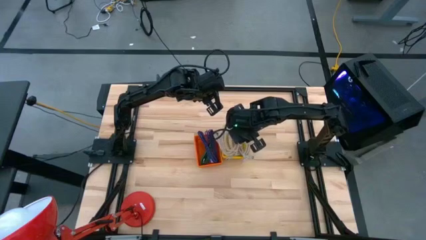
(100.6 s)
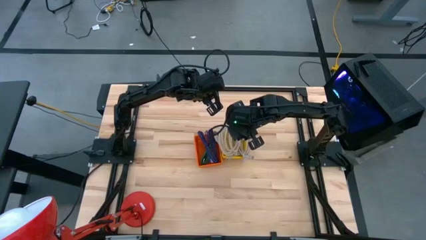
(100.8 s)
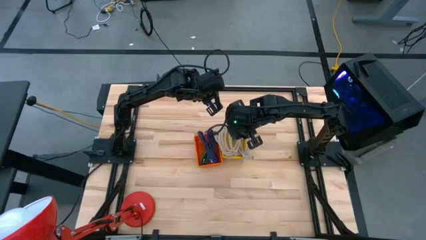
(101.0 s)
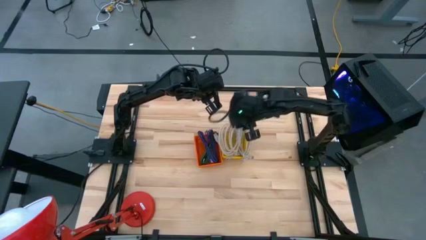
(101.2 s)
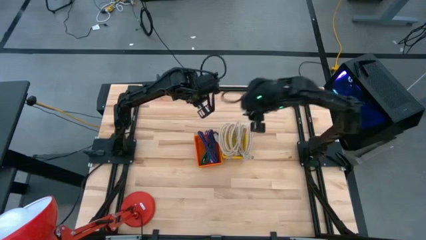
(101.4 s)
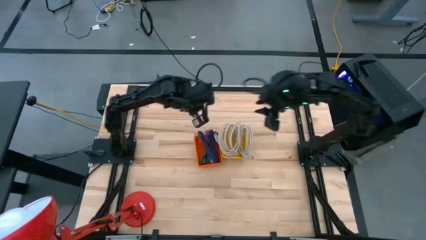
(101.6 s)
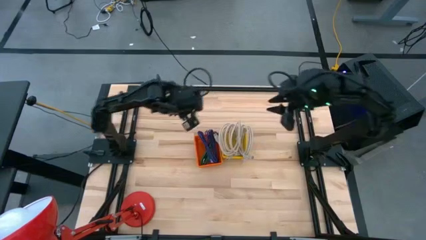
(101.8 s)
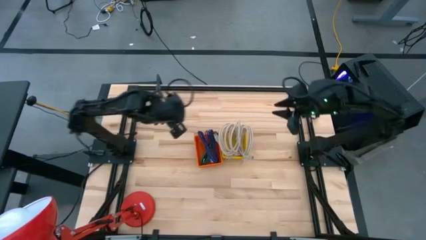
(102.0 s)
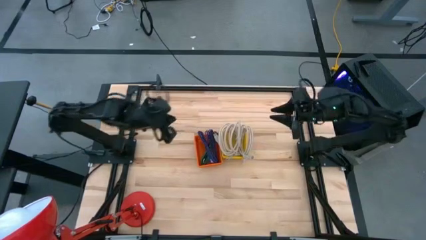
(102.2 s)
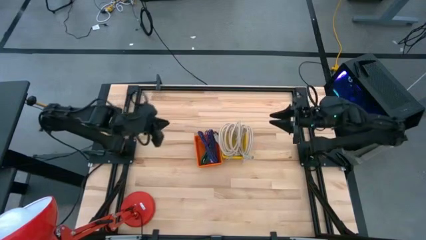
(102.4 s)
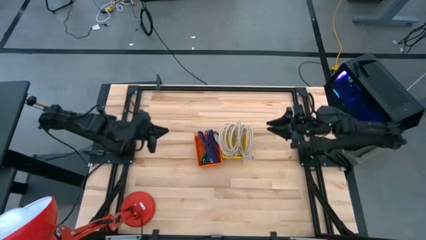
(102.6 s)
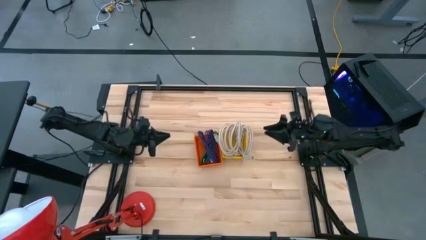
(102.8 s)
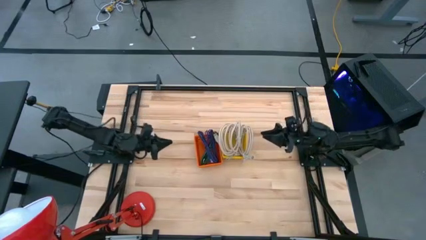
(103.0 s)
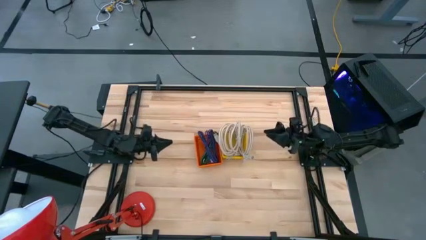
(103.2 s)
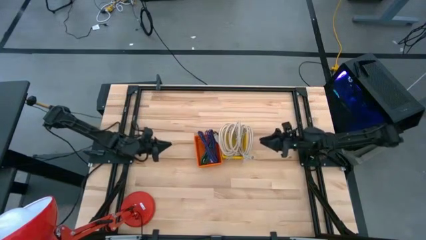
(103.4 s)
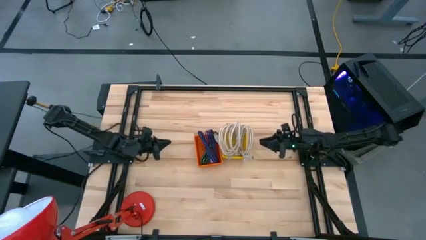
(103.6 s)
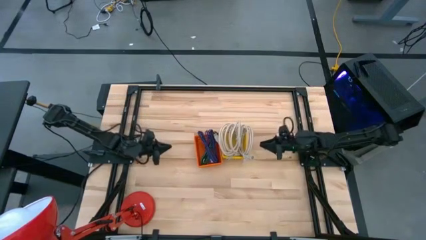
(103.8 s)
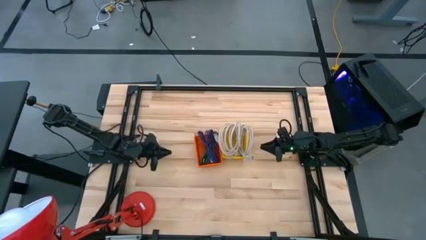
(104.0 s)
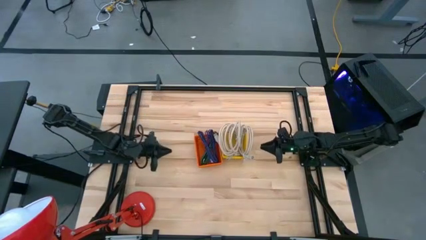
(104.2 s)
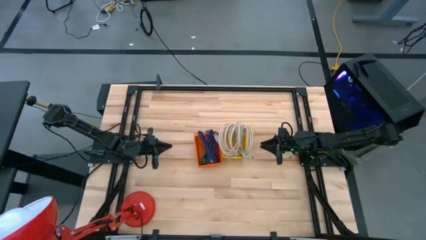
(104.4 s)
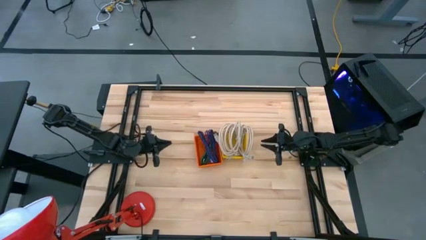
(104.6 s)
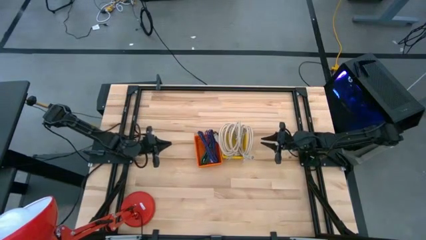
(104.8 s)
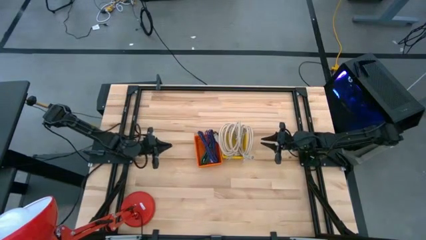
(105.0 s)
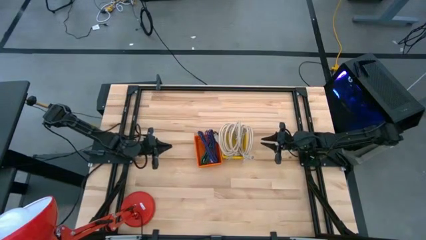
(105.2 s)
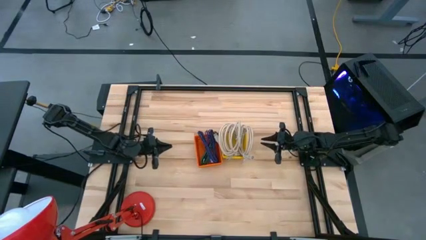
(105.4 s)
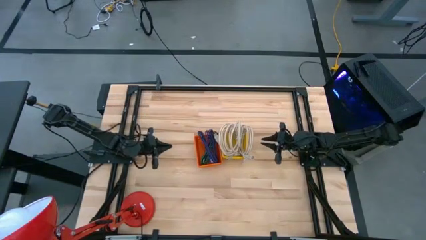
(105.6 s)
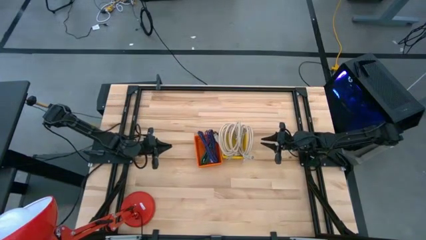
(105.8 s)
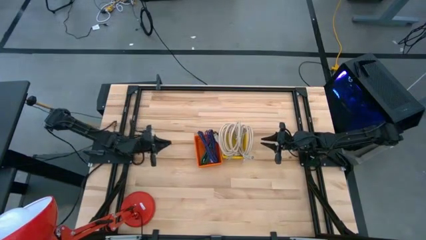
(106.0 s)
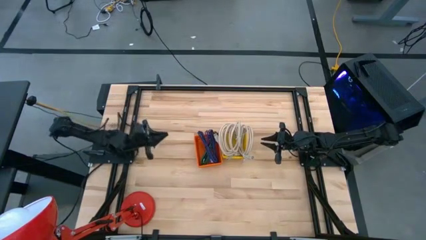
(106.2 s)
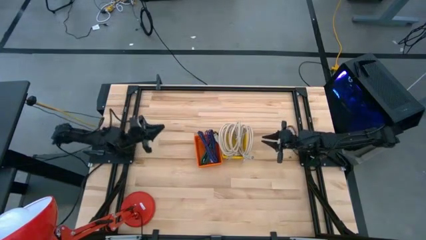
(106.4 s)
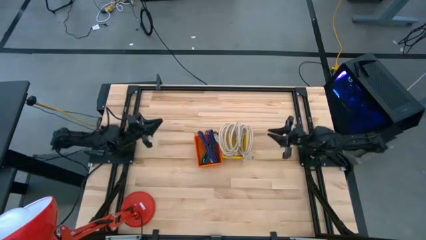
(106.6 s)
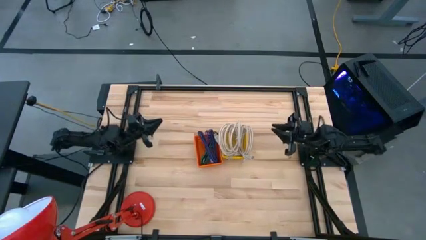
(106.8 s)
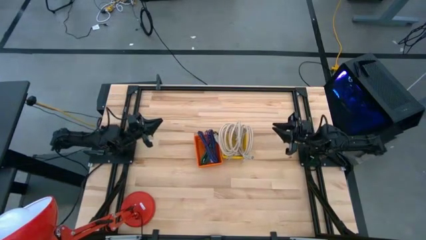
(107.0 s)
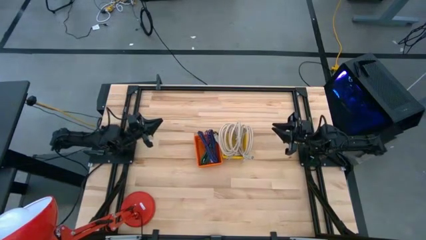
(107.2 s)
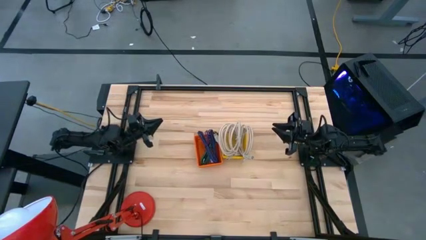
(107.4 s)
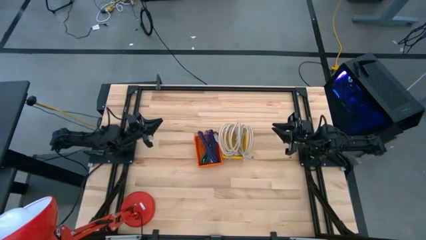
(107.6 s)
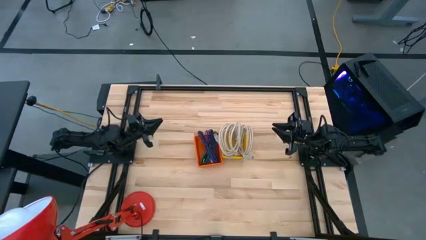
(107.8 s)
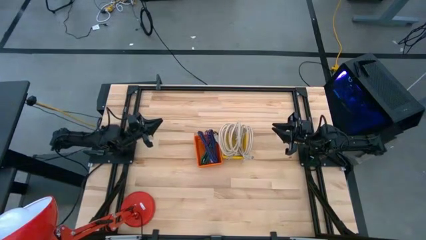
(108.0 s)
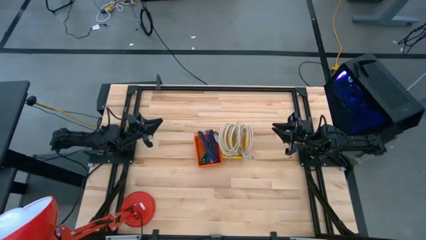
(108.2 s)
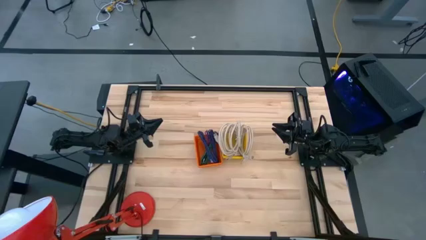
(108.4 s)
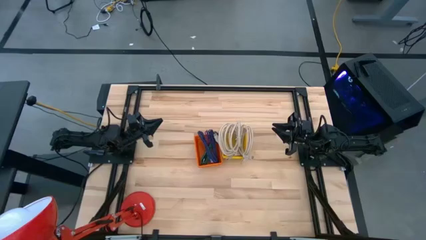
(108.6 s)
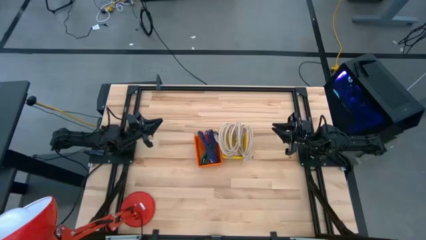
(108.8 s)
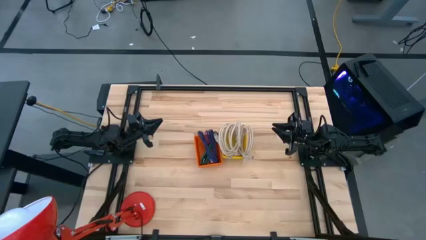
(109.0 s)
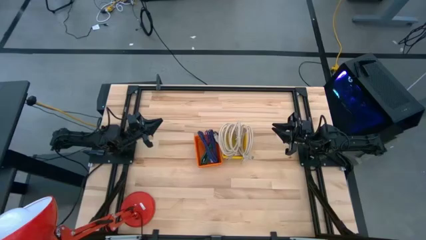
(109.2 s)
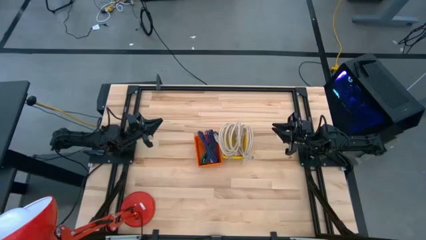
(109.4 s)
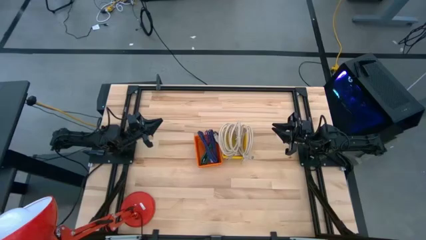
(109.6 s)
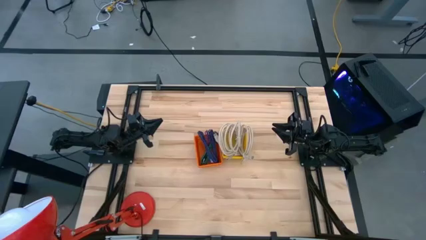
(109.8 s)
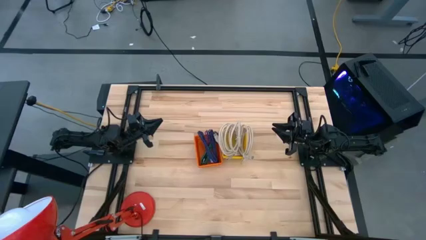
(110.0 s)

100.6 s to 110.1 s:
Task: Pick & Place USB Port
Return to Home Position

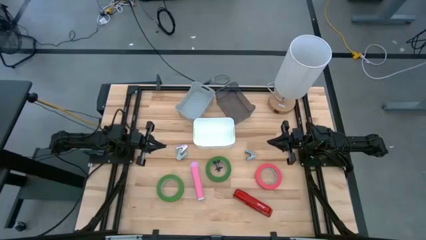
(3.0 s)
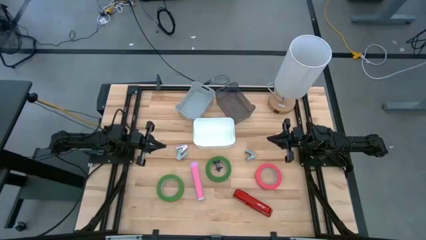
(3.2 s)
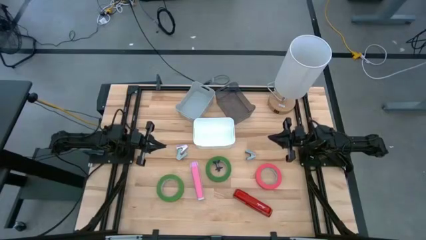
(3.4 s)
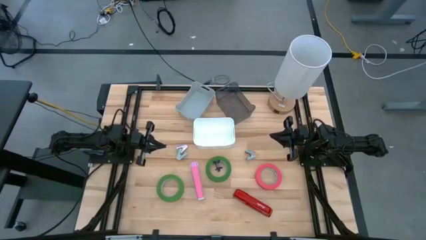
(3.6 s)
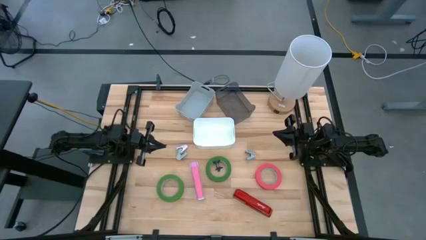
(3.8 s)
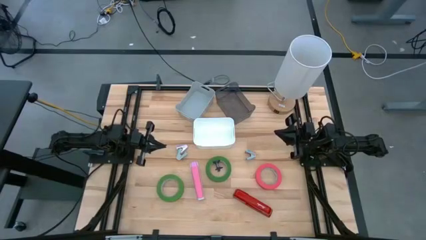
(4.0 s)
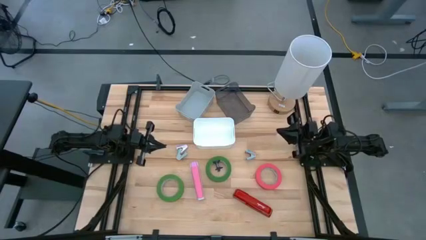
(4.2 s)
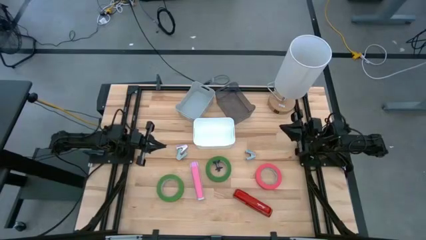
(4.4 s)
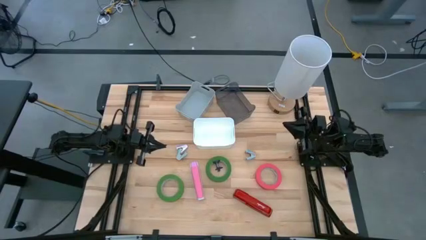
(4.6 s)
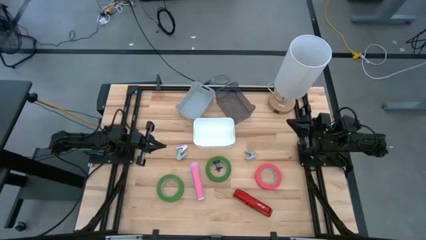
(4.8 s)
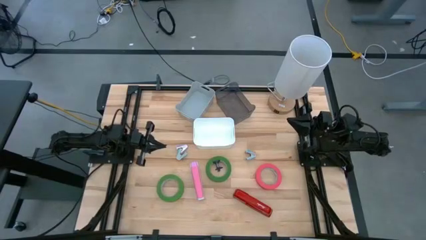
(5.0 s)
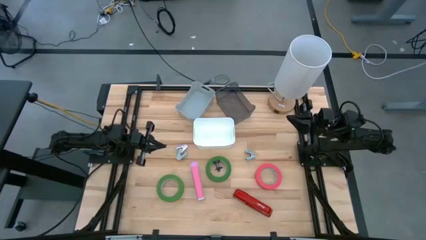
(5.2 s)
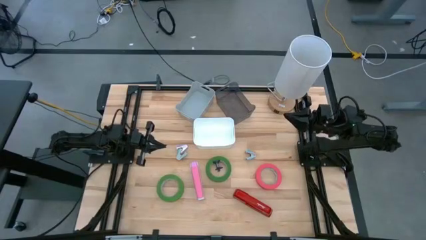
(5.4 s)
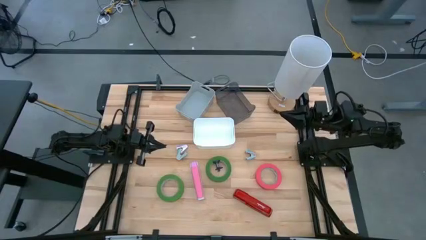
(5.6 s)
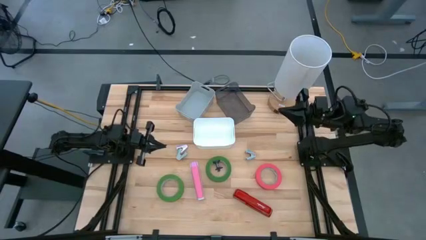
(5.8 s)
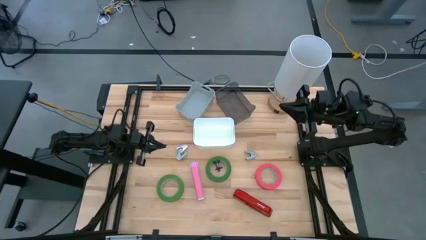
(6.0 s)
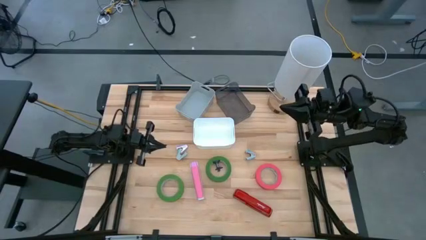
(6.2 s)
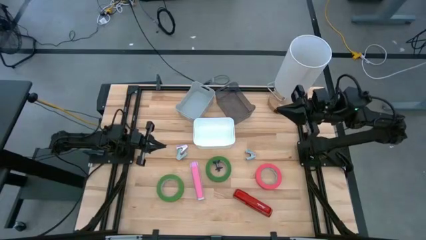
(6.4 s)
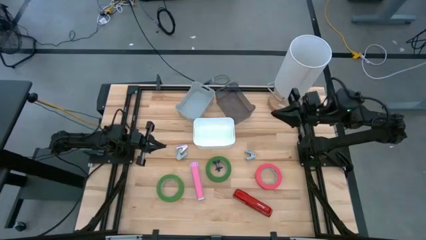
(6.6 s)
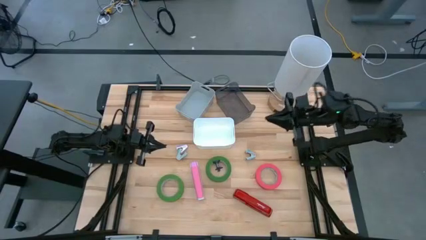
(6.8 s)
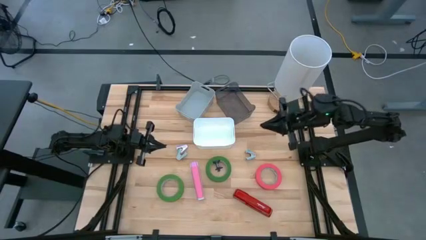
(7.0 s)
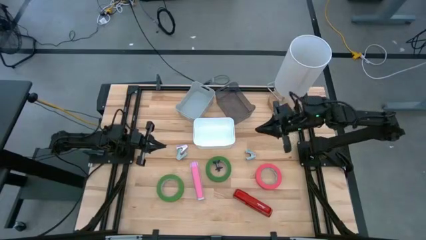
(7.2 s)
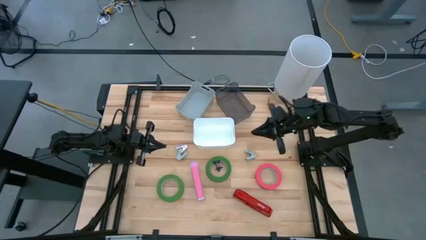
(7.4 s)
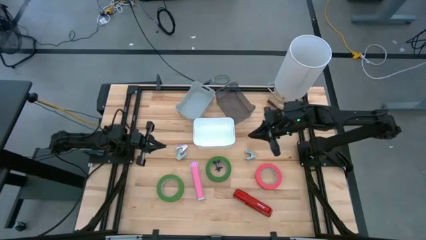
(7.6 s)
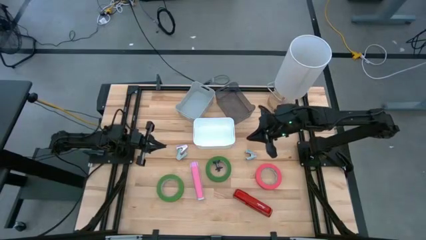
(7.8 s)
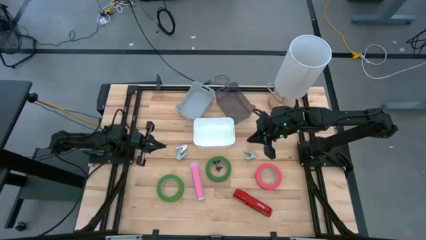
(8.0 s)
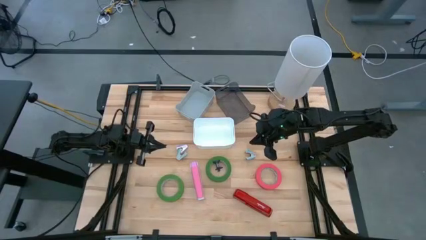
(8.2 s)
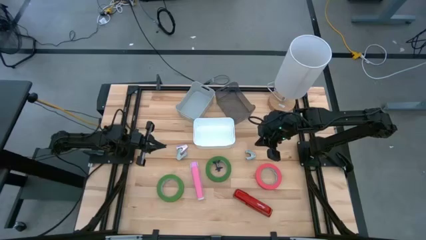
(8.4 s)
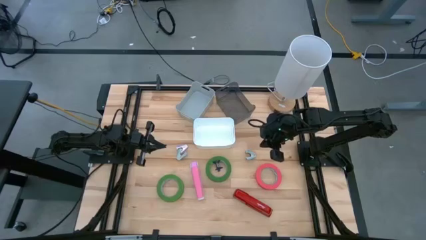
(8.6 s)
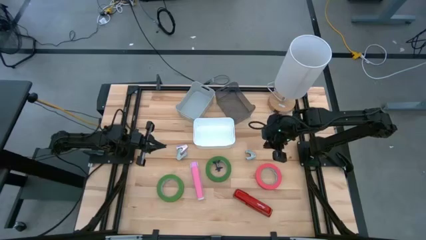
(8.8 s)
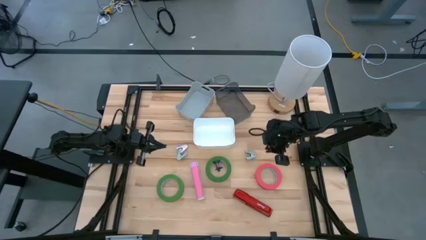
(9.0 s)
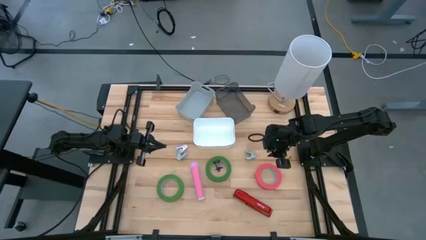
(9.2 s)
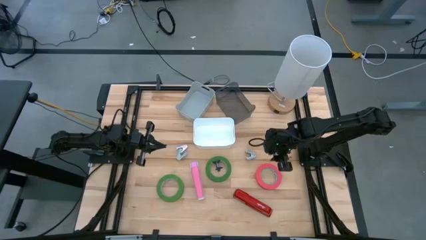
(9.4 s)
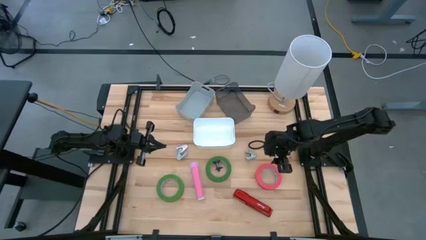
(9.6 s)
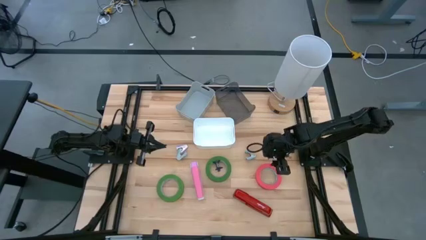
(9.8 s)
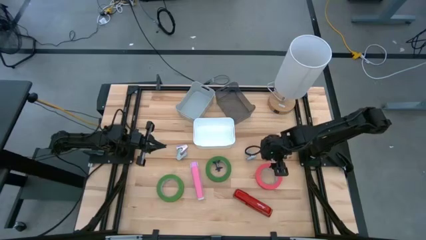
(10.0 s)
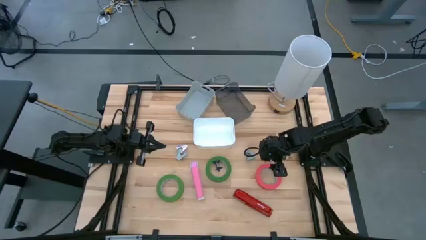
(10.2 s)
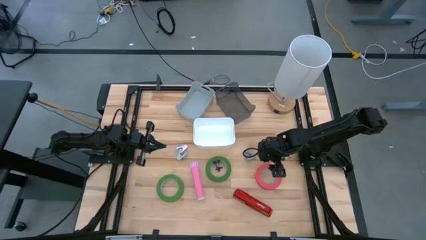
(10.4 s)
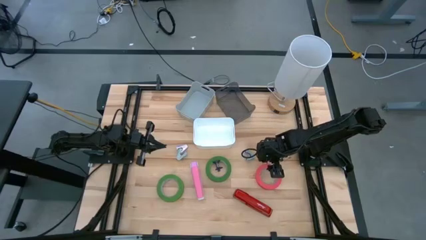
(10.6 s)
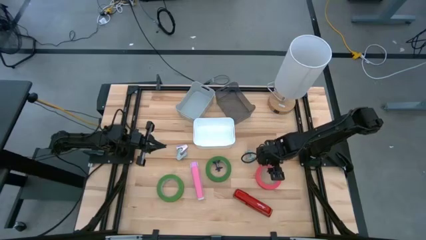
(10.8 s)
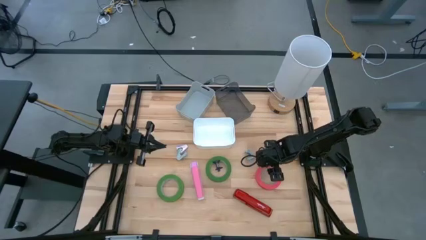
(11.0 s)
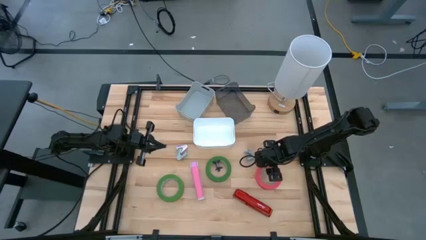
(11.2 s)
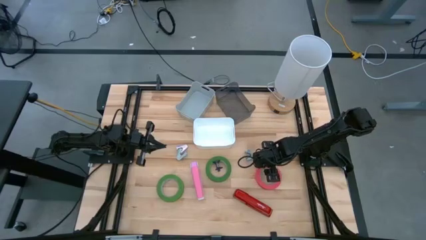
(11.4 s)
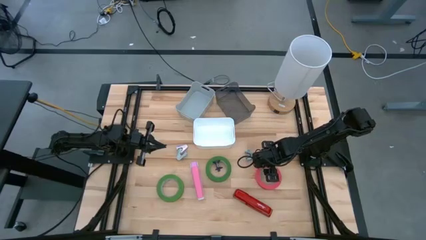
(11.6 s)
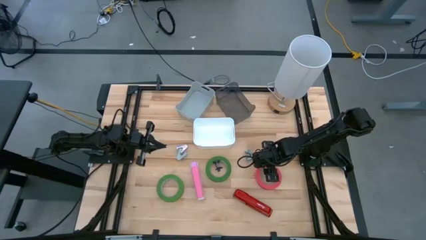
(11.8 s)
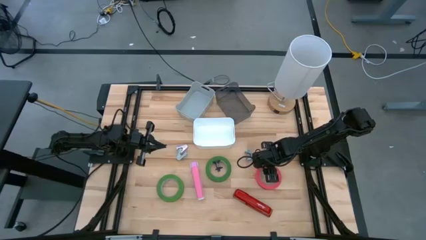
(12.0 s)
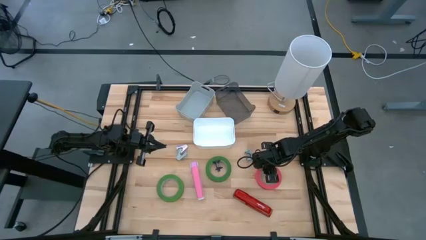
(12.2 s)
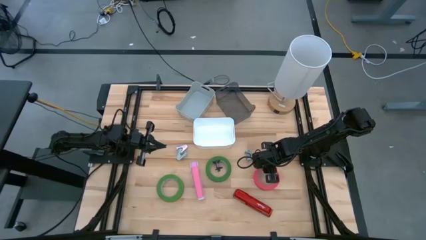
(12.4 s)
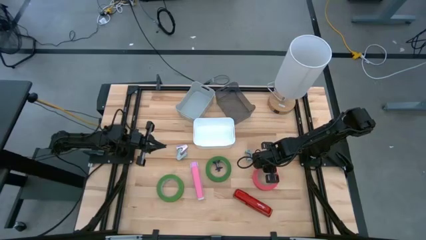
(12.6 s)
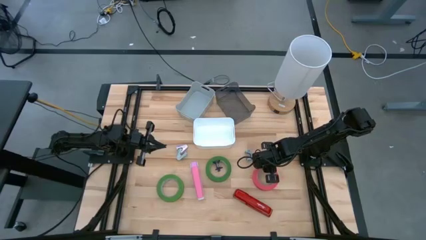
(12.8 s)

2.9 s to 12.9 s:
Task: Pick and place Stapler, Stapler remover, tape
Put the pink tape into the white bin
